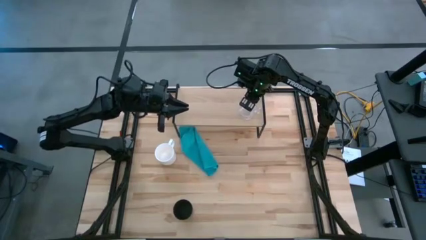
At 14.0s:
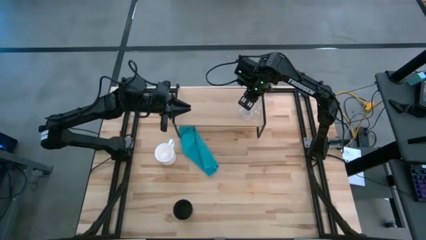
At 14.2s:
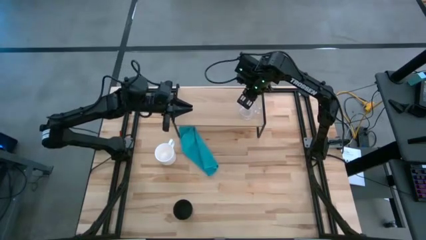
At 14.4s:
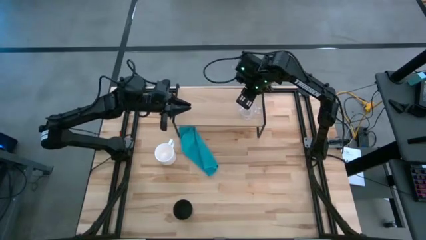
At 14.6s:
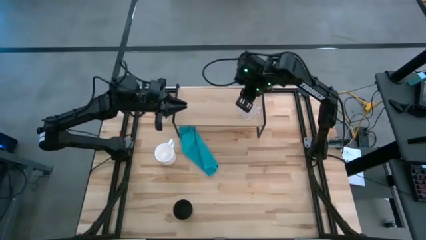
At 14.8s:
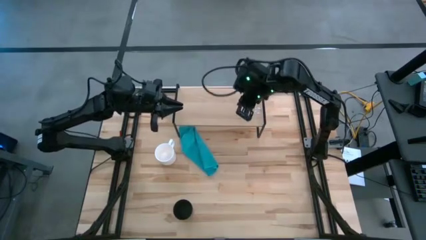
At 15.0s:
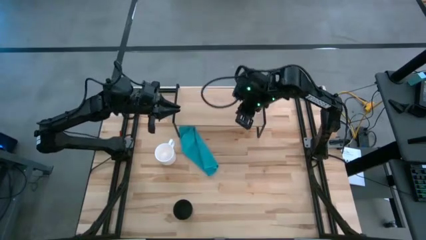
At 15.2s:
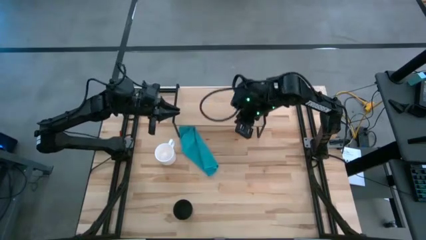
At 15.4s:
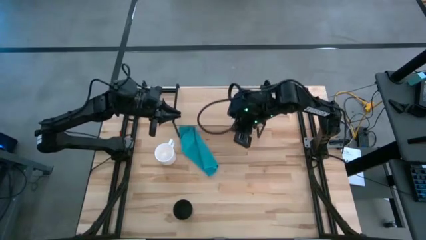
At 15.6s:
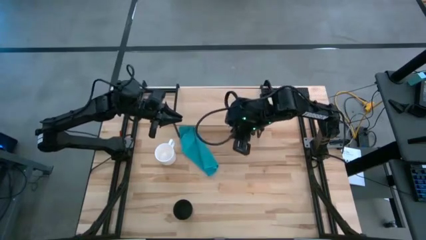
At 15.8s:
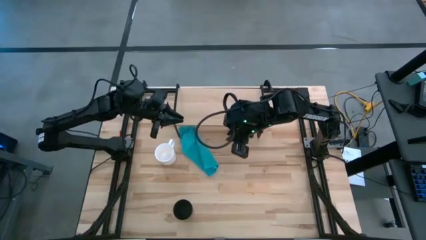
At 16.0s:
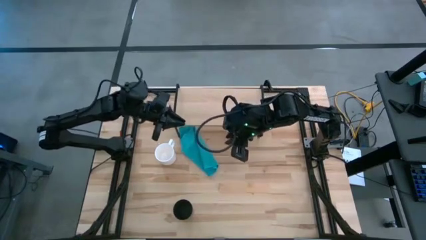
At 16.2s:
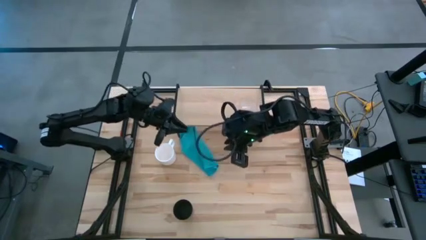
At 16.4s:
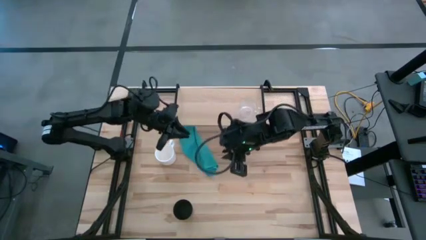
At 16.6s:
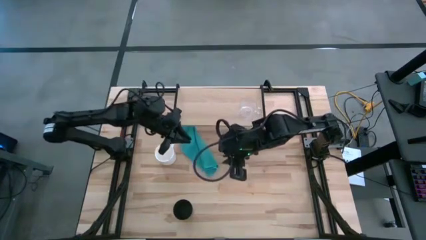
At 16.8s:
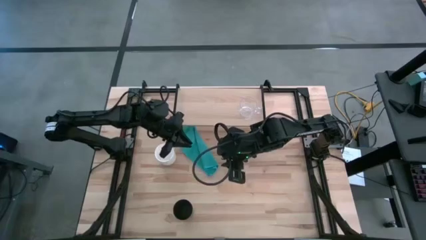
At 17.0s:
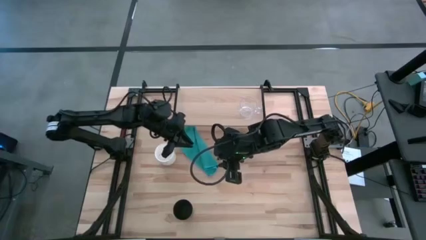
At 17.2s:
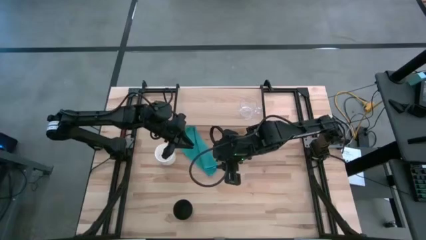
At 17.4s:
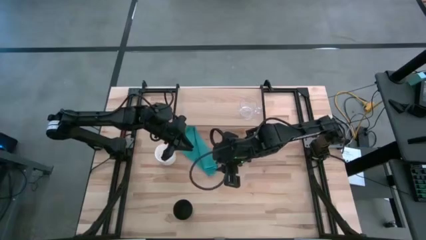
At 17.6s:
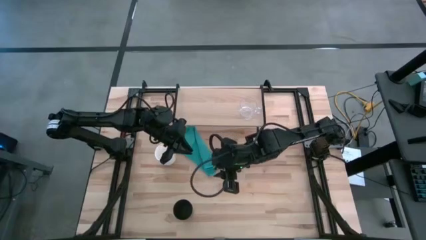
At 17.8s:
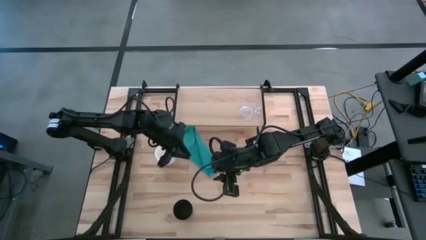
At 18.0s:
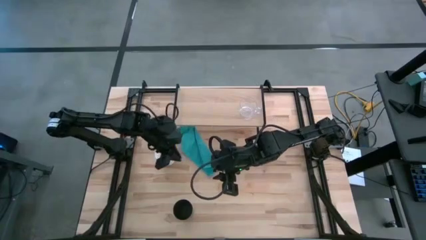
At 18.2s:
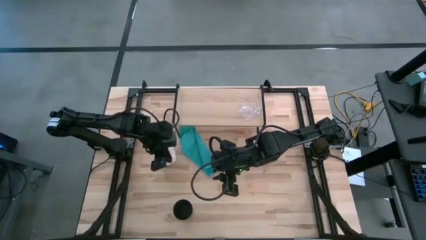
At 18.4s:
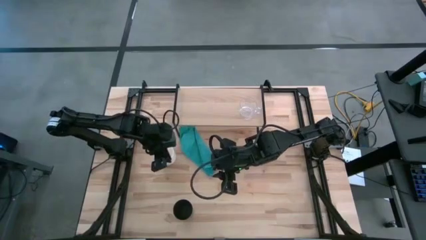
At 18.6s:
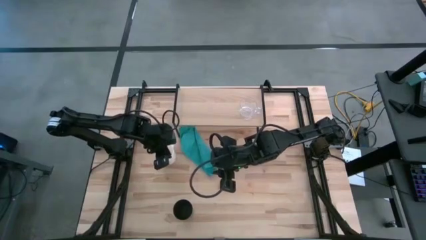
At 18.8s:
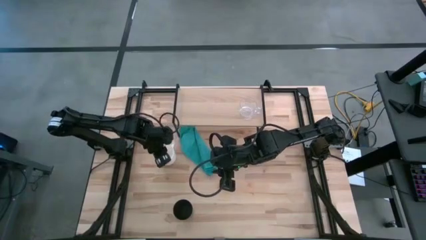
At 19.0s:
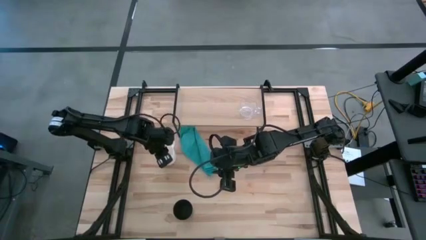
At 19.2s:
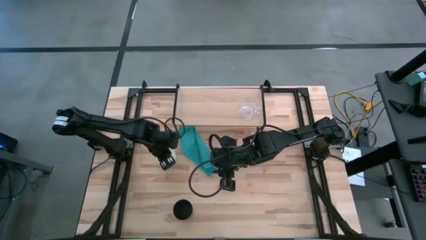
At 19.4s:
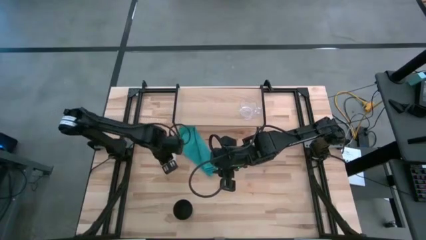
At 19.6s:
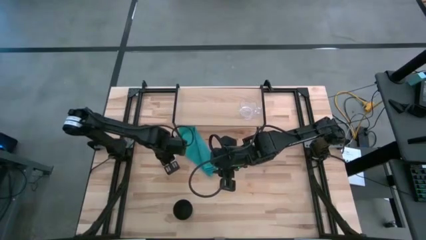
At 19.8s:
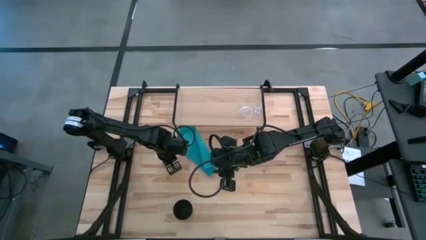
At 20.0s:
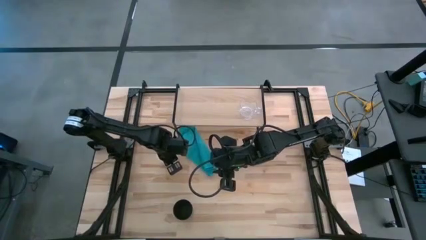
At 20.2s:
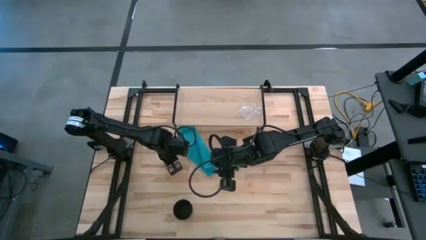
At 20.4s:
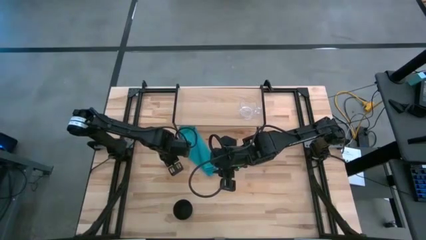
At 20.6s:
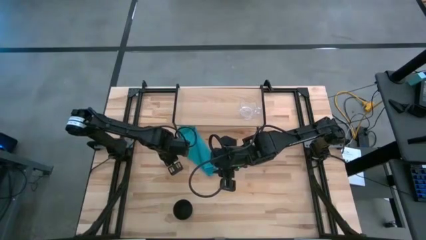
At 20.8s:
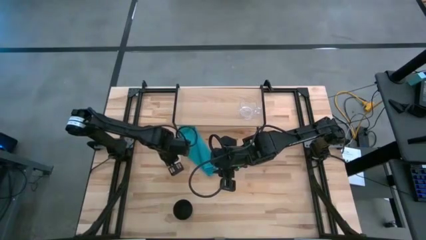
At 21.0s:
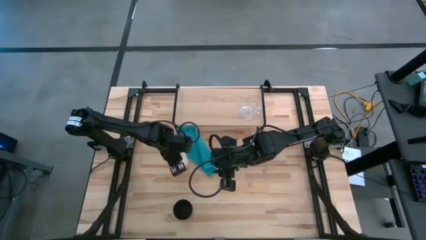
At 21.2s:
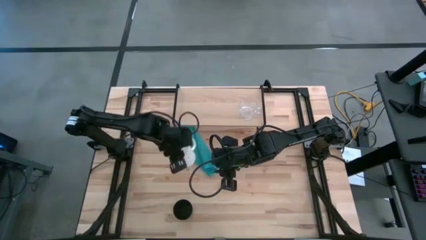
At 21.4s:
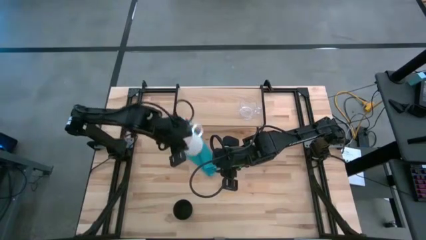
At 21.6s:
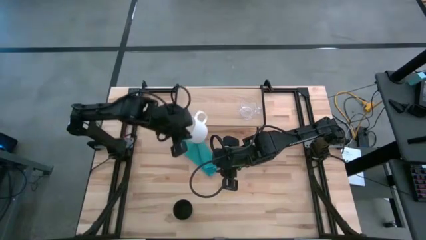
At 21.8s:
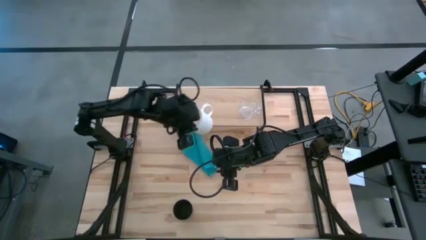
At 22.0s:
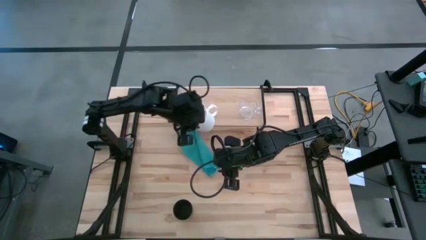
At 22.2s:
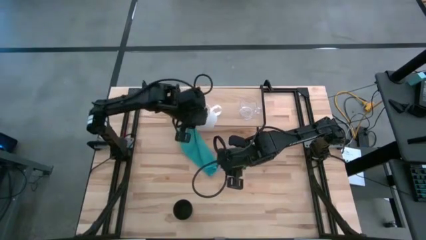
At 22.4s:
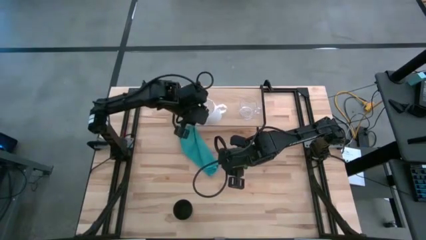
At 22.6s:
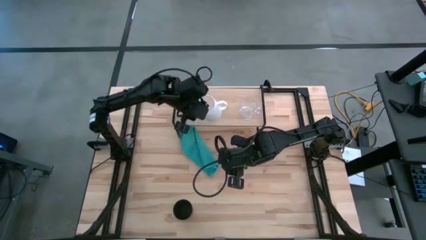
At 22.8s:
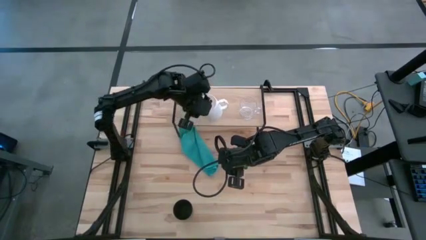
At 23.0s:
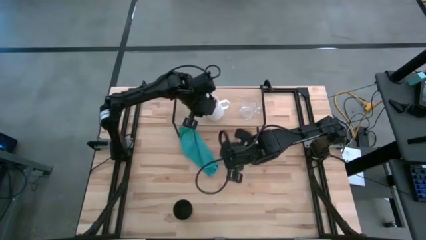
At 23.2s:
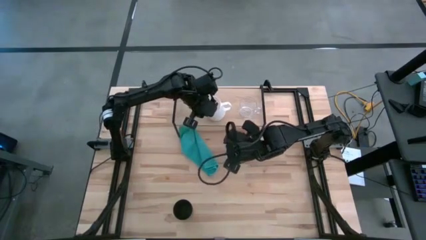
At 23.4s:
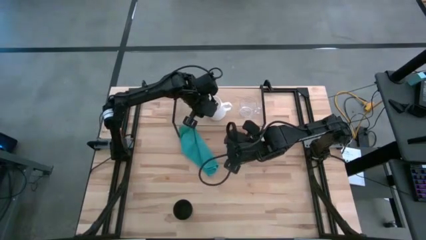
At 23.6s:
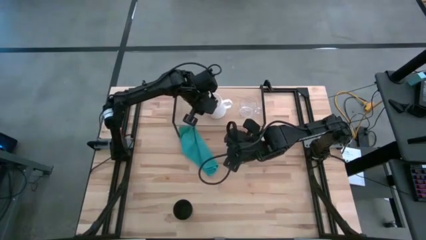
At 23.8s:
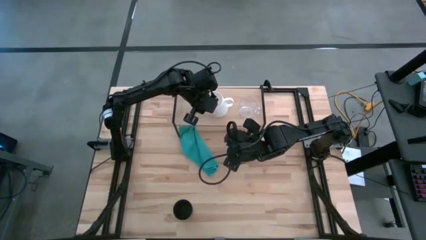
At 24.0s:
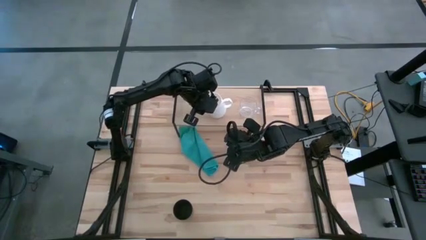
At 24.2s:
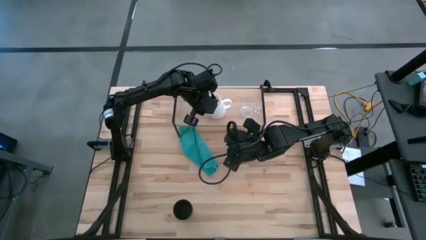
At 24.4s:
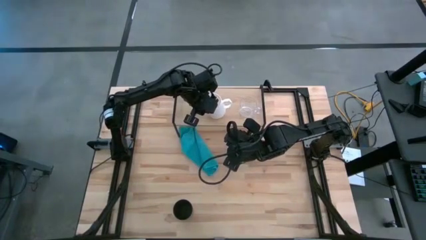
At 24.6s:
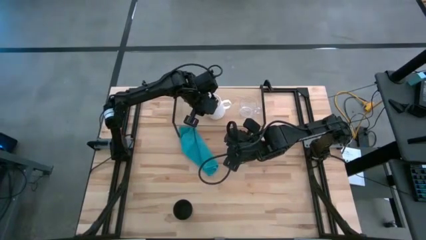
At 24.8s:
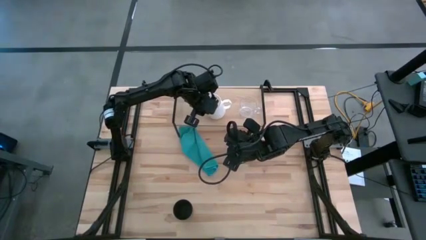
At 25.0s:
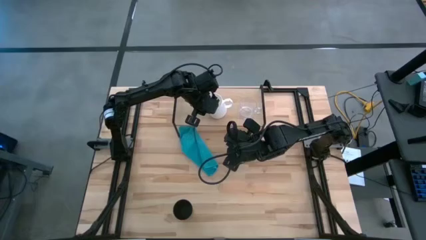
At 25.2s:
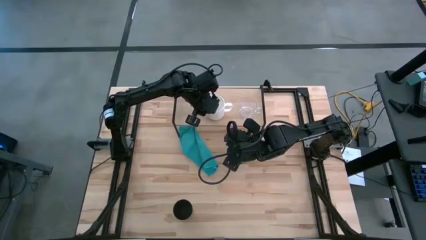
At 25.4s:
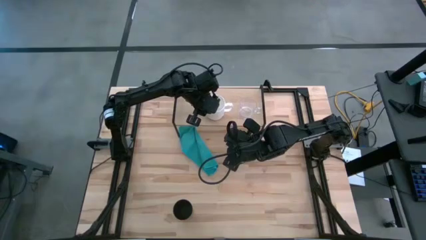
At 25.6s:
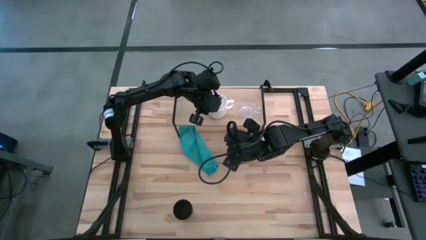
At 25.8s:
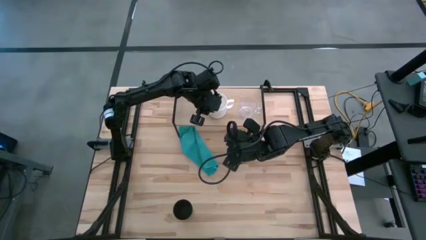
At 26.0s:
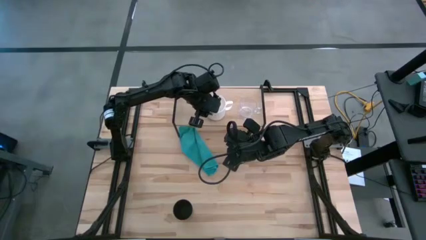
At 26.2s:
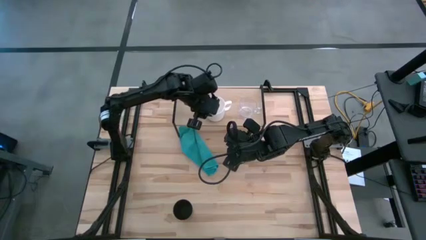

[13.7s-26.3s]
Task: Stack small to large cups/mugs on shelf
Put the white mug on the shelf

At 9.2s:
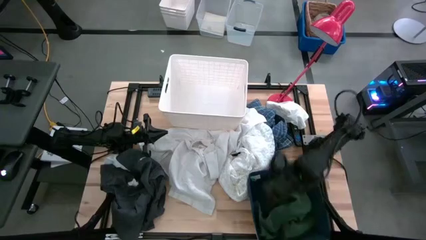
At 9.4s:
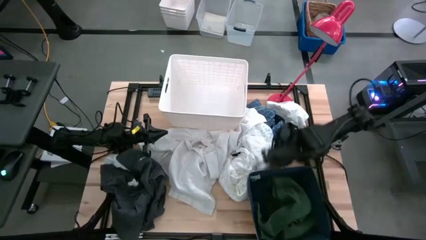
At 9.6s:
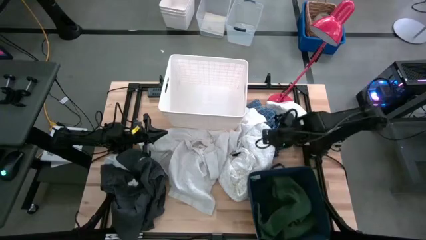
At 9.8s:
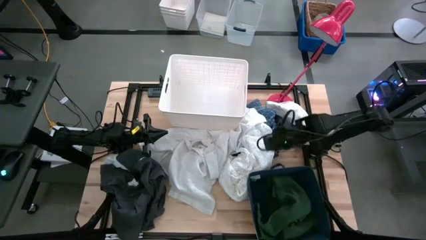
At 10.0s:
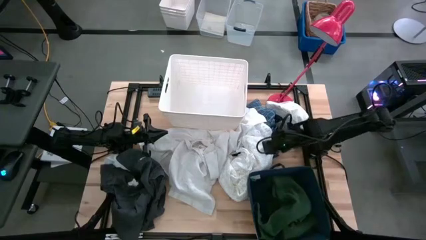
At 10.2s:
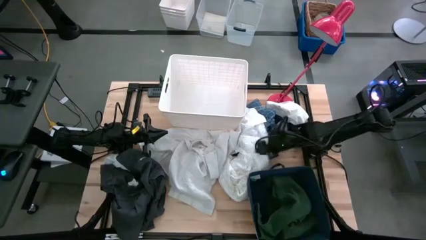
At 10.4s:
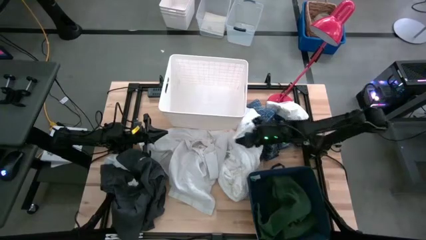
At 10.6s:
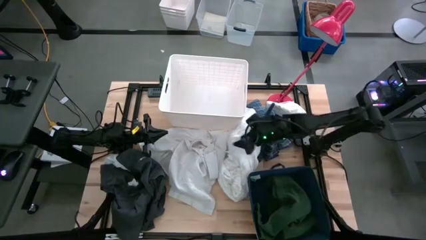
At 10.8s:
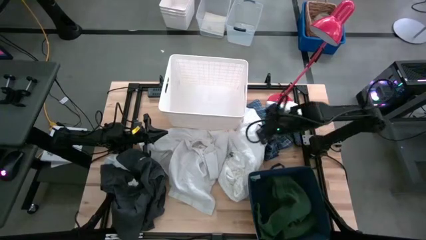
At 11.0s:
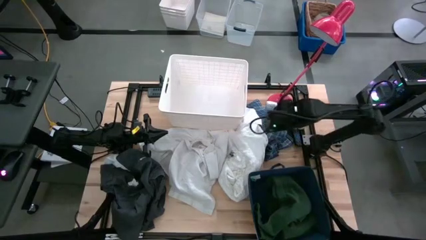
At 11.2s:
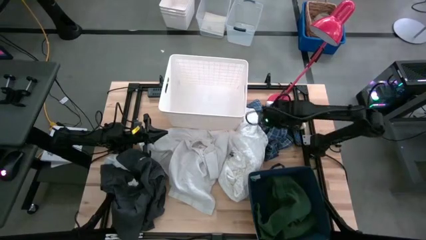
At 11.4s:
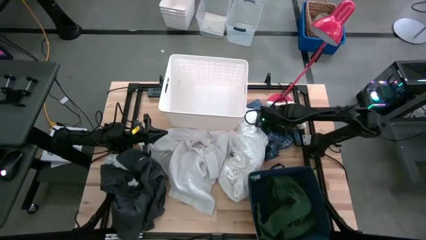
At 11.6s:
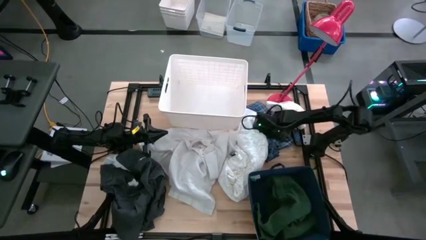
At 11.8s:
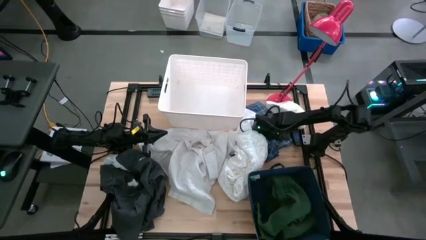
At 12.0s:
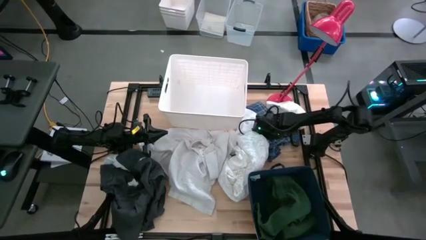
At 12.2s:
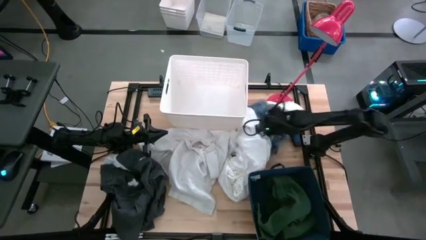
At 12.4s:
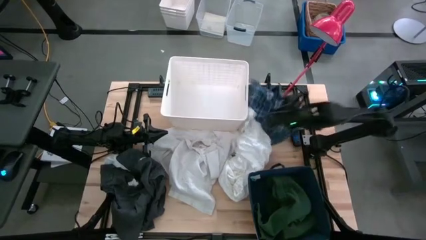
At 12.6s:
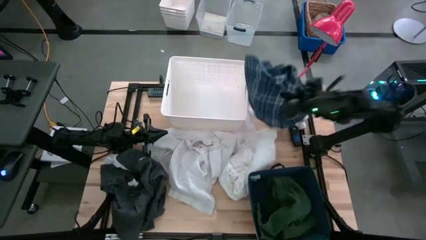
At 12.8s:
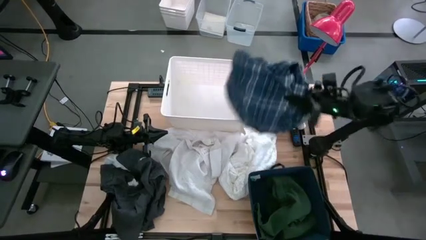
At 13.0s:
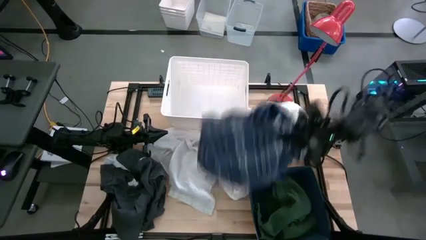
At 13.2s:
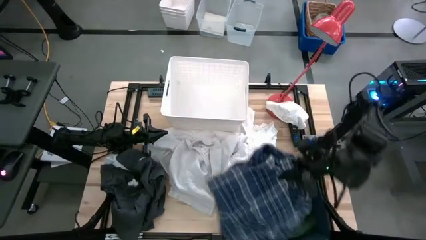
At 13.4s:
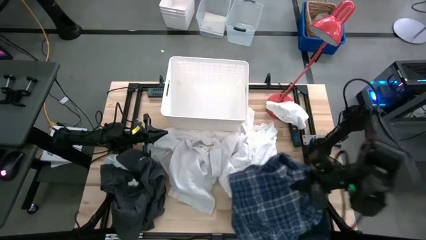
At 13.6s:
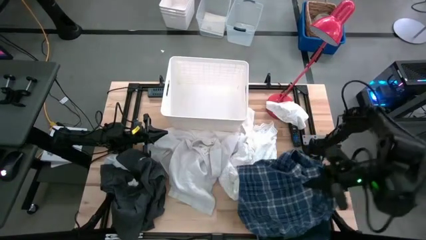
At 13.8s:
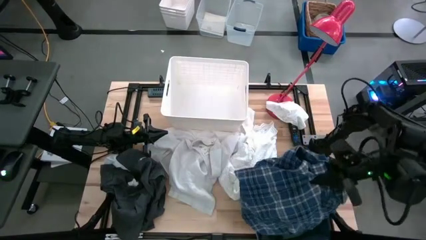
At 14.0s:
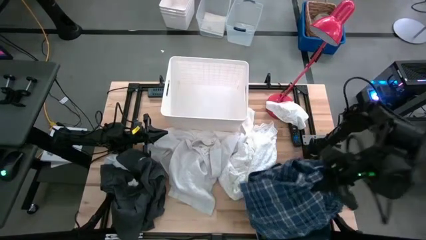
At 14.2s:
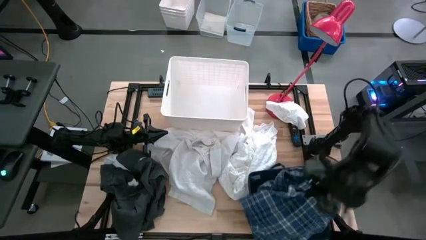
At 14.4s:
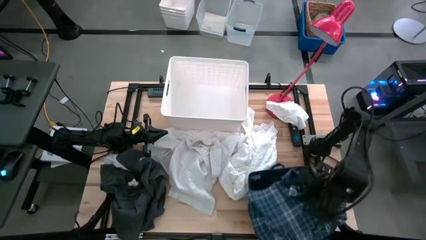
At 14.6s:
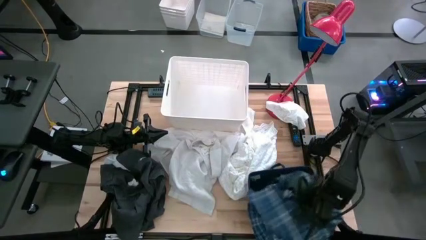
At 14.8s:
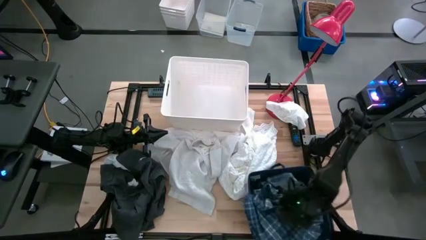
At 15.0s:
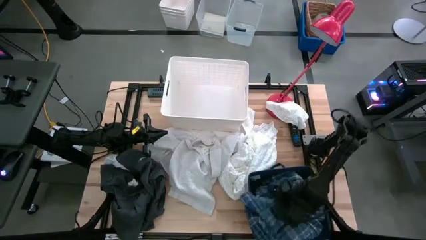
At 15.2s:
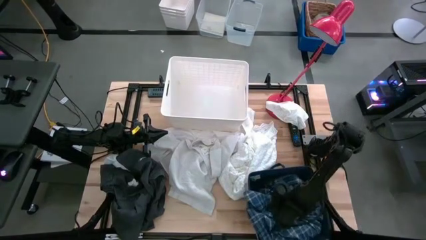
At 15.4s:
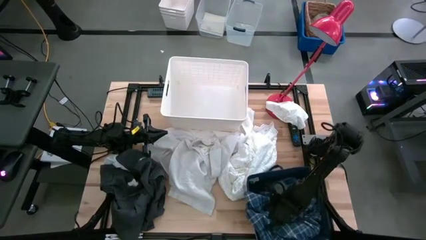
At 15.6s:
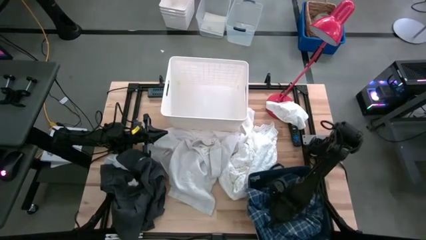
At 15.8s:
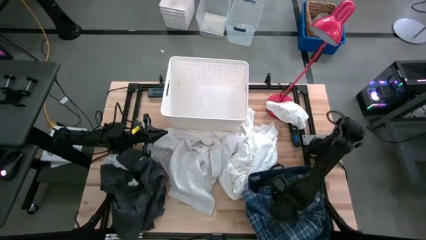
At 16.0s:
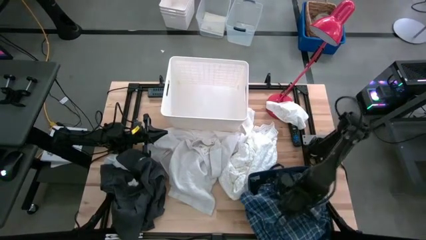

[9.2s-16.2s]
Task: Sort clothes
Put the blue checkered polo shirt into the blue laundry bin
